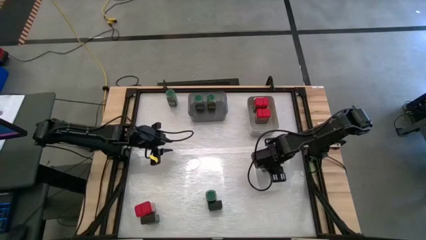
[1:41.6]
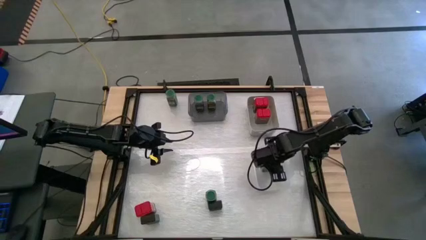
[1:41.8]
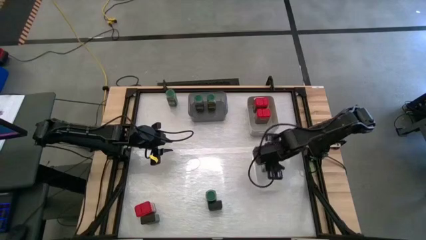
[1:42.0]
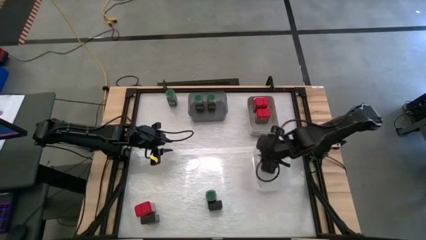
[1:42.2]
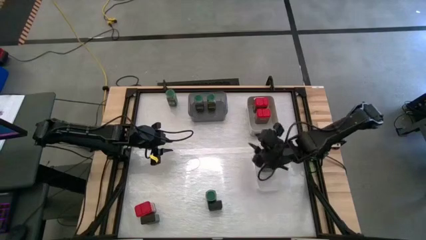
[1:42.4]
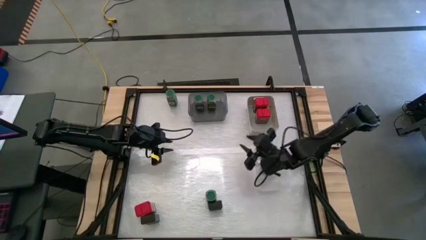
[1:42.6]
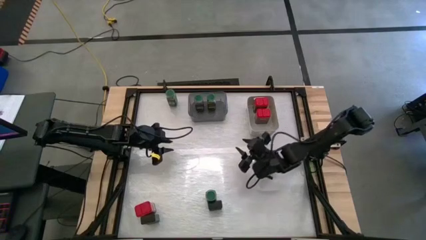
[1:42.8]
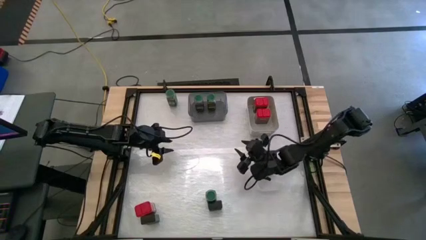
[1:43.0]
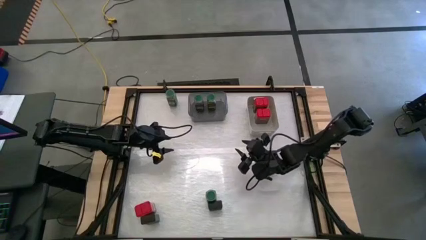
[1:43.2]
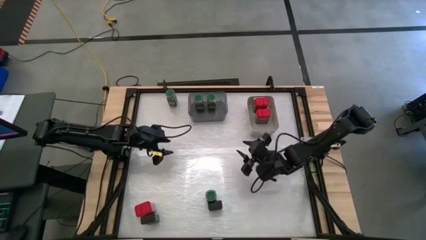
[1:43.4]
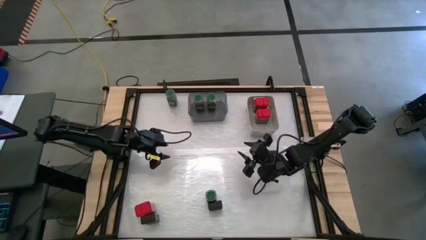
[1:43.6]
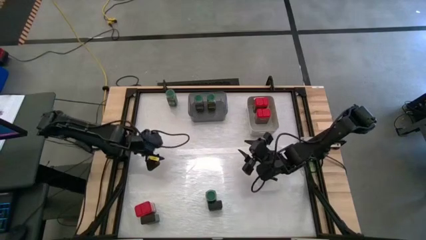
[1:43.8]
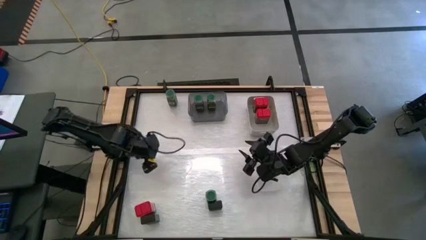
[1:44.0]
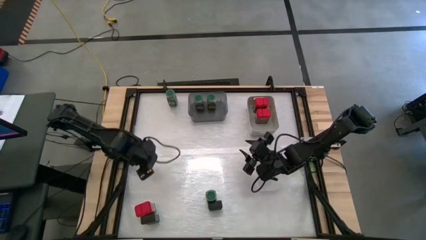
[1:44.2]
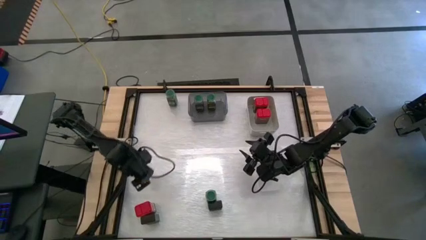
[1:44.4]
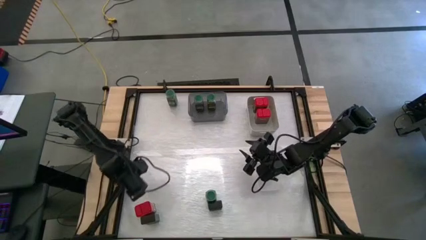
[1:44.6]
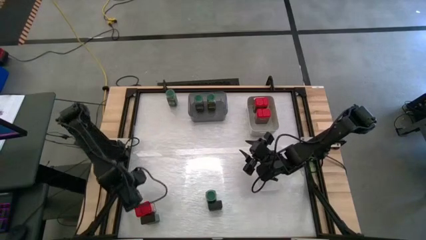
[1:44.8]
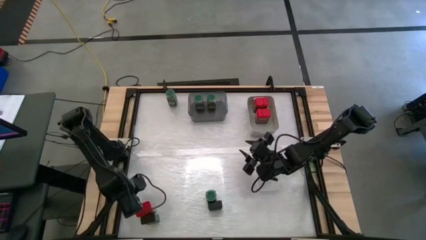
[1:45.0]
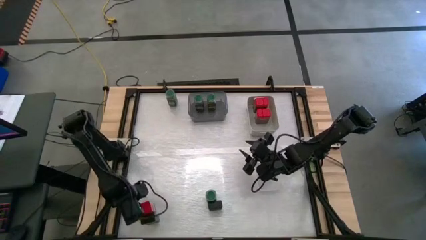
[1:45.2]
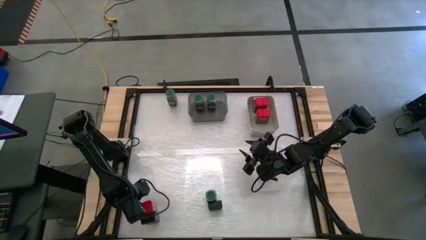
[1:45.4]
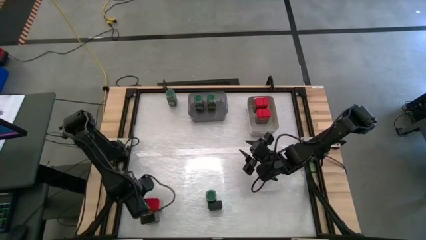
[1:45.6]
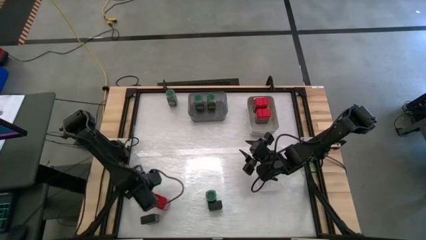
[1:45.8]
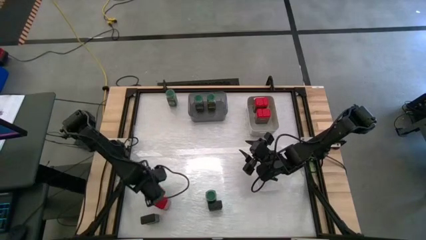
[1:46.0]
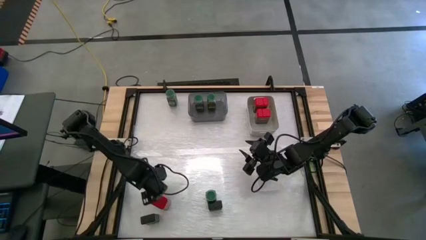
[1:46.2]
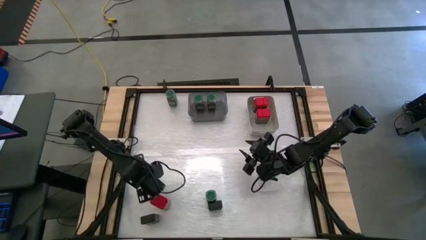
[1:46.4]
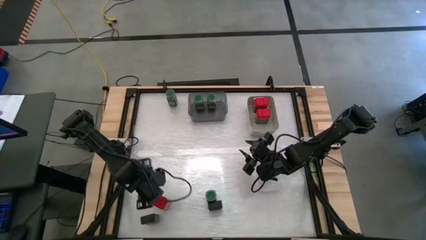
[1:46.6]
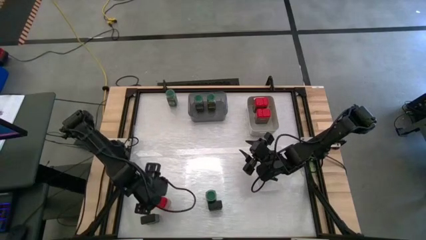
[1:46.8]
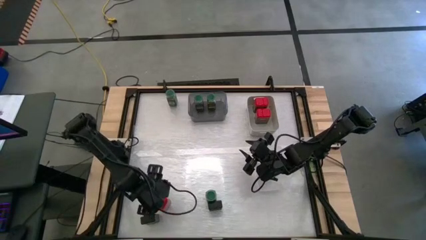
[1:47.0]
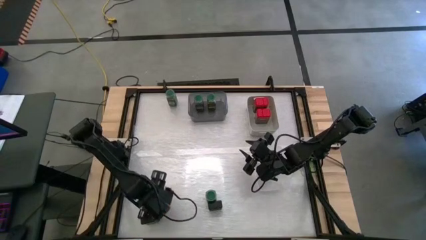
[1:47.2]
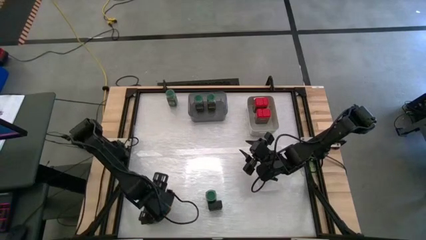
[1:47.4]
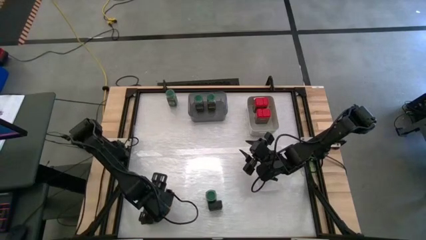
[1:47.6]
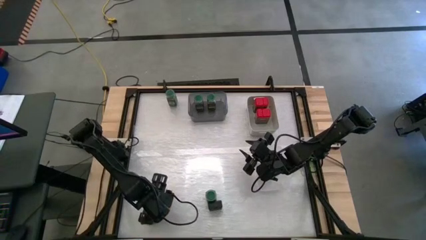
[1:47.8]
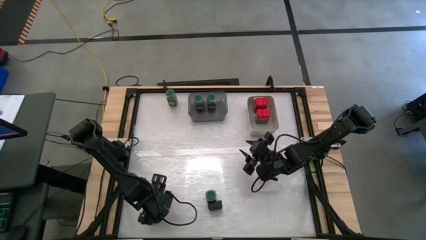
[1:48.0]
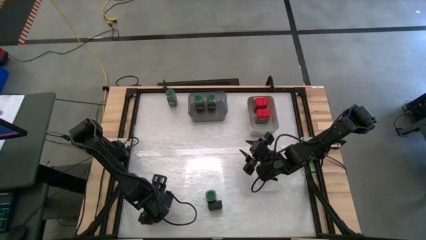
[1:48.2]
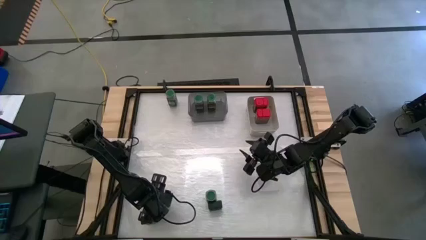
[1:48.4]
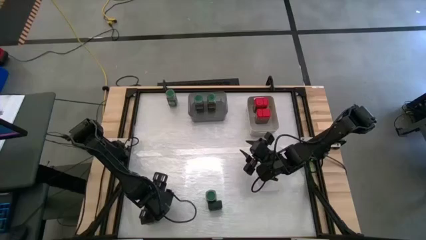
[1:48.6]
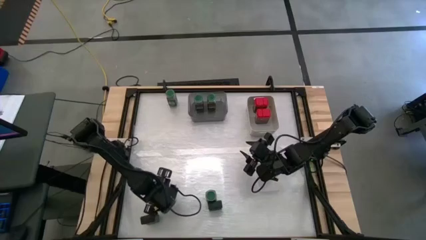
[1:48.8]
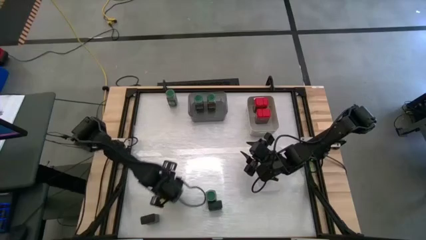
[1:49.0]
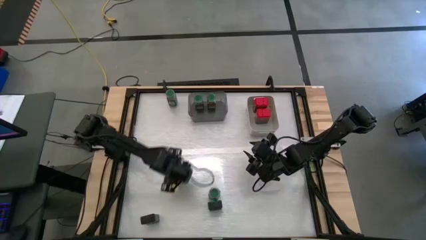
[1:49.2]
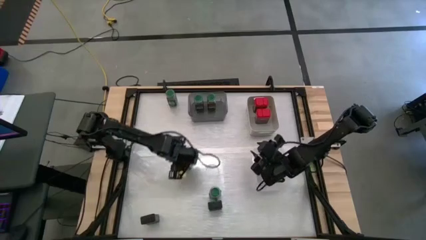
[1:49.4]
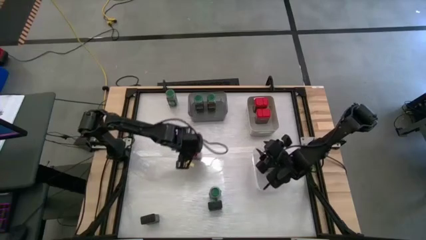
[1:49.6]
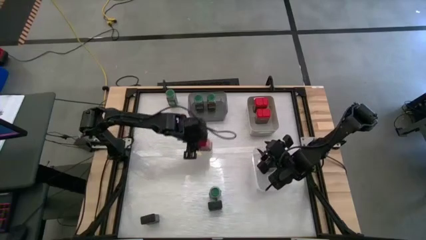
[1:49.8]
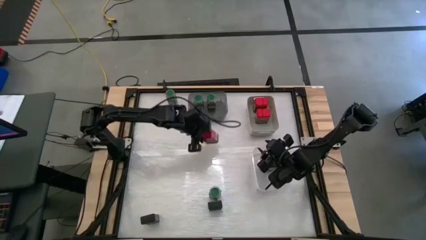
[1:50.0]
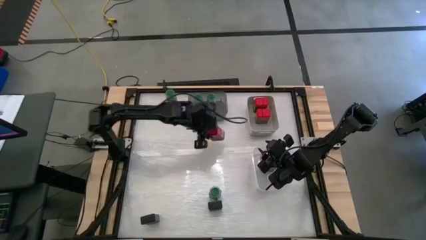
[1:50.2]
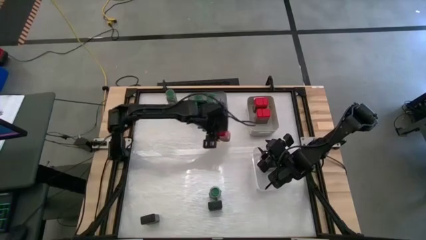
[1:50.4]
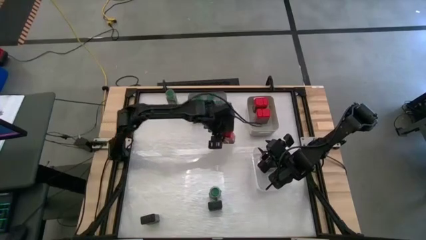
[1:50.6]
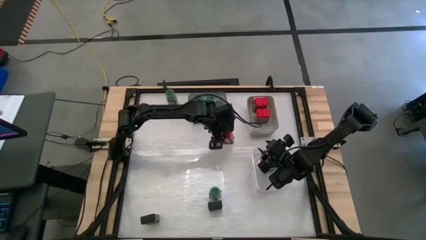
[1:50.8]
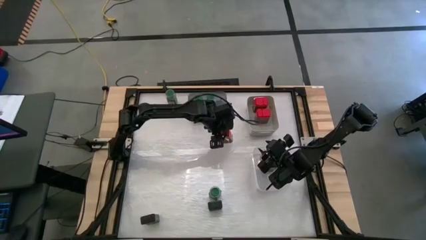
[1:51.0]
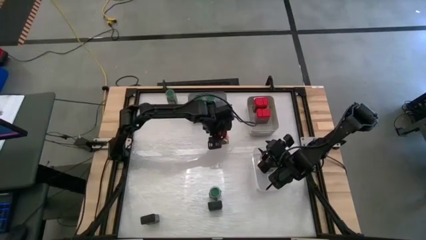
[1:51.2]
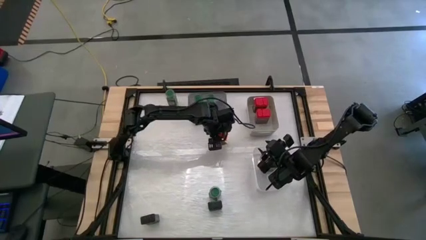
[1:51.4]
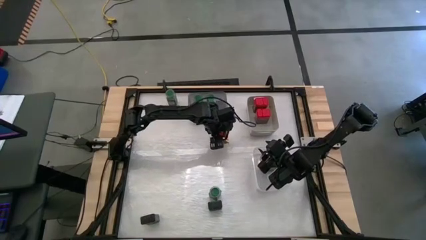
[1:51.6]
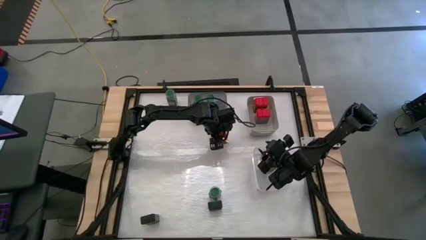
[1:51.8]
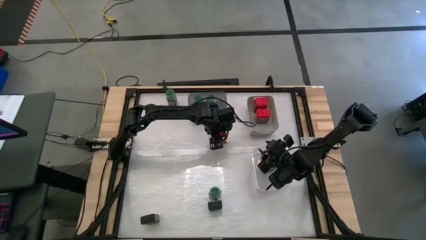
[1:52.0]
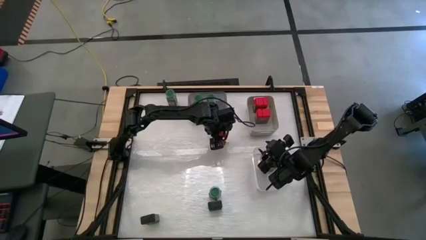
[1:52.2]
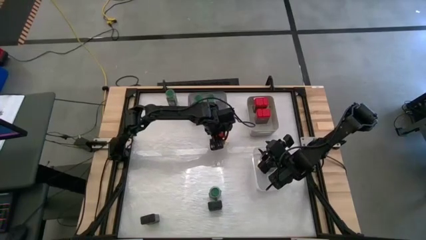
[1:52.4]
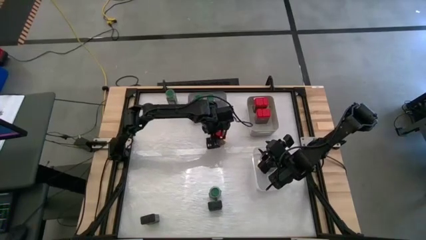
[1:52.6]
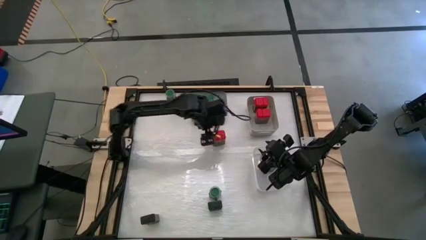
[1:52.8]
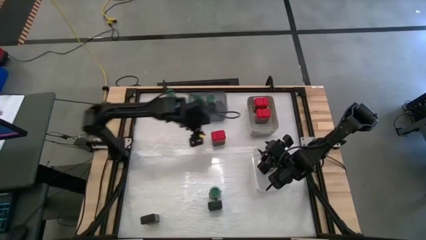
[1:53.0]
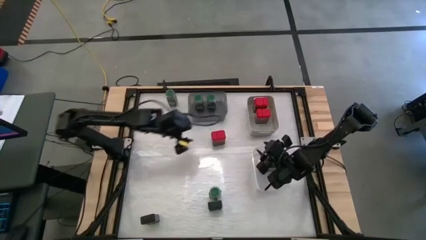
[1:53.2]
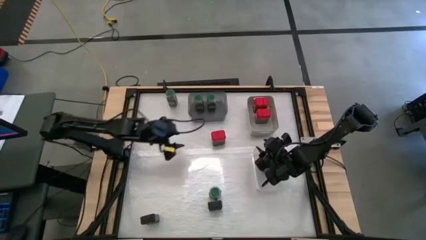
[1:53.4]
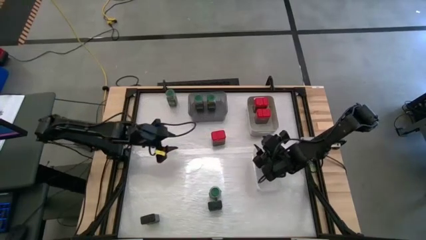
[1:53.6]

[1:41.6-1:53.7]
Task: Sort spices by type
Move the bottom left red seasoning can to the center of the table

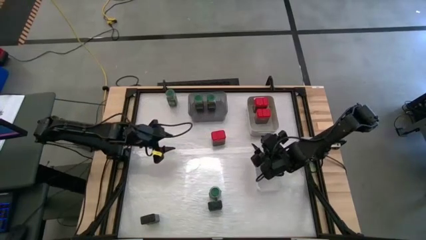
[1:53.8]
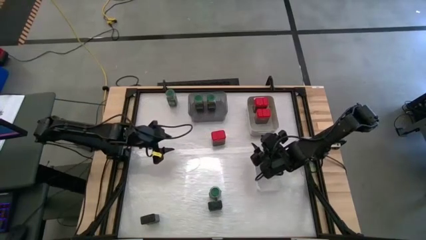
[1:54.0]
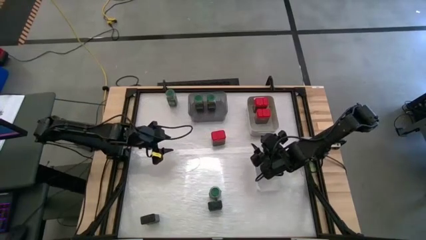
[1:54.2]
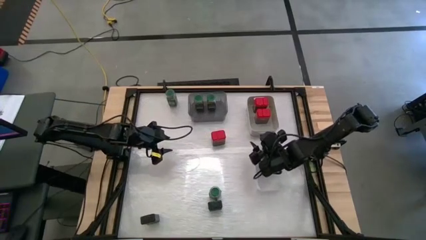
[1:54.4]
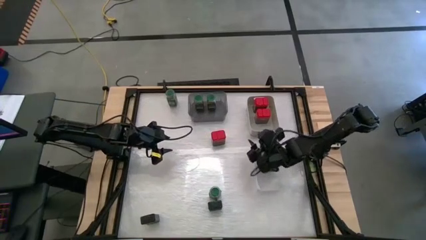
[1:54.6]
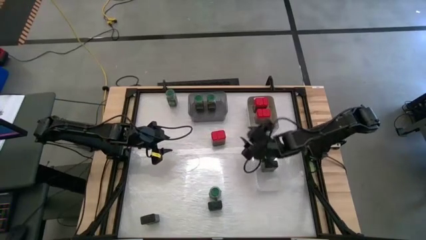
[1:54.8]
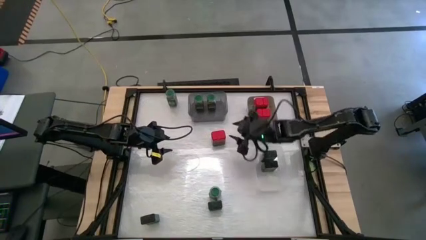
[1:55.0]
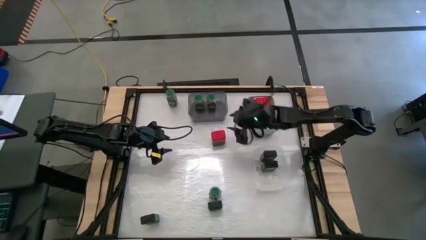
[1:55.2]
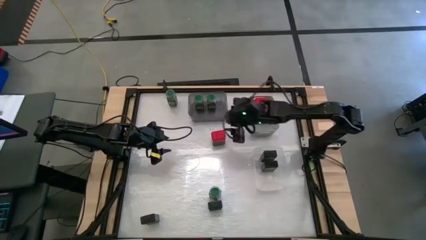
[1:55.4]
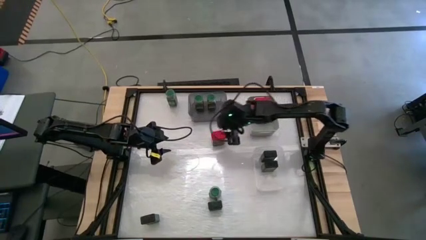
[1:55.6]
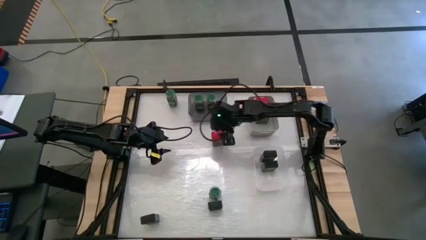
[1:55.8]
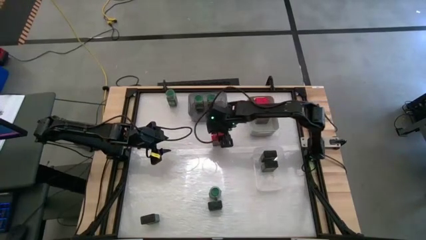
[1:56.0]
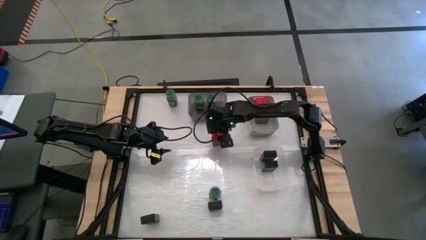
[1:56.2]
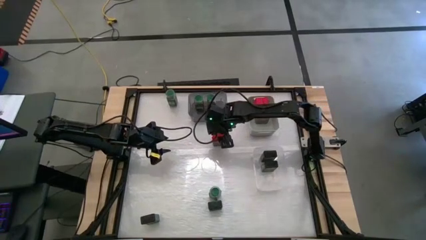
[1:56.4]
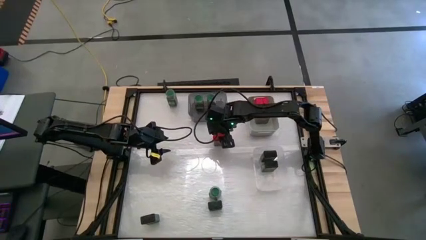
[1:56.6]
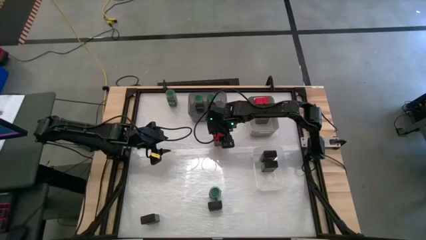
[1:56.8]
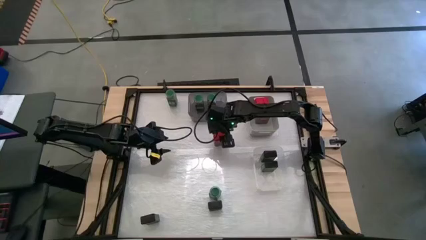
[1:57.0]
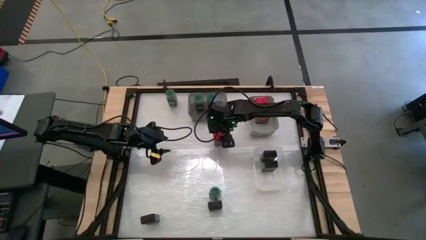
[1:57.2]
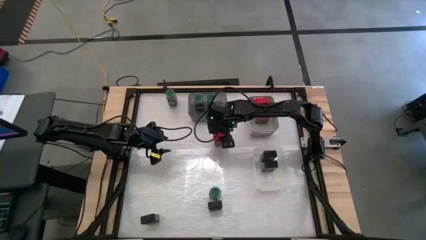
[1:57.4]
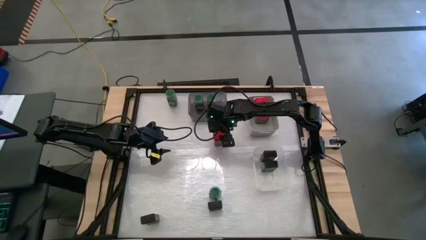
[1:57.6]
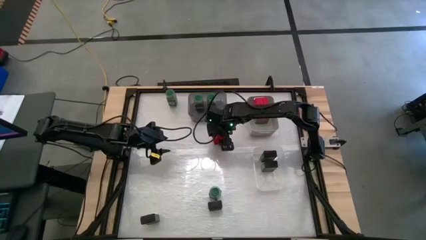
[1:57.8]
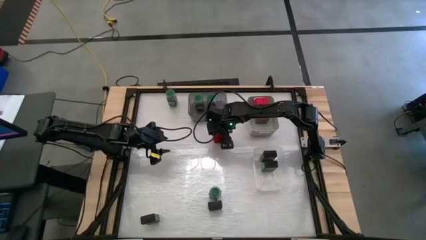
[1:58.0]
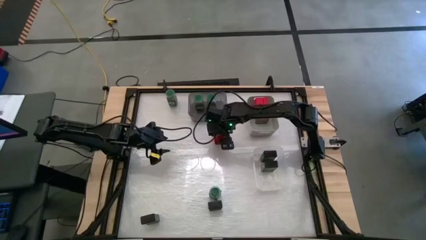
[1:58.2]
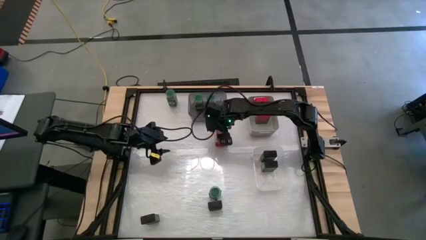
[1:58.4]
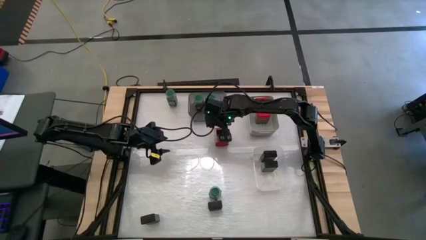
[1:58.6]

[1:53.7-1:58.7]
Put the center red seasoning can into the gray bin
